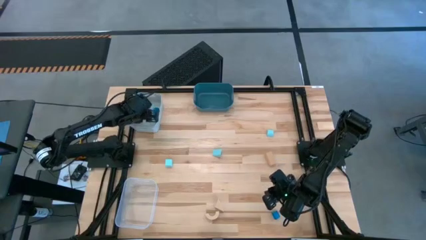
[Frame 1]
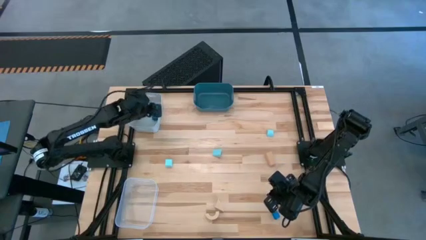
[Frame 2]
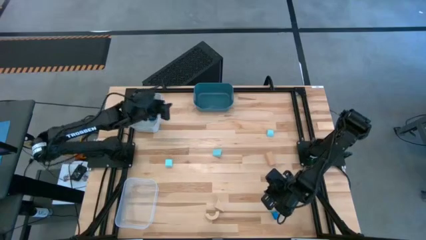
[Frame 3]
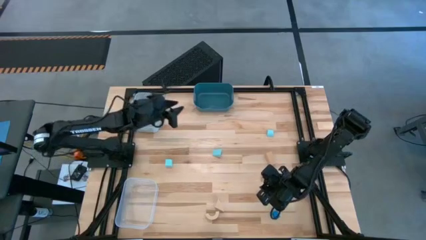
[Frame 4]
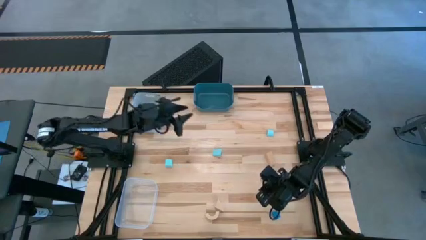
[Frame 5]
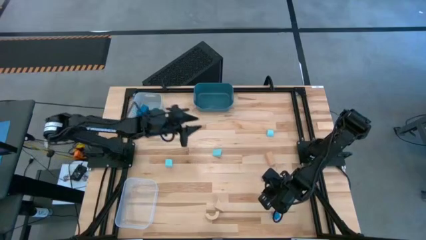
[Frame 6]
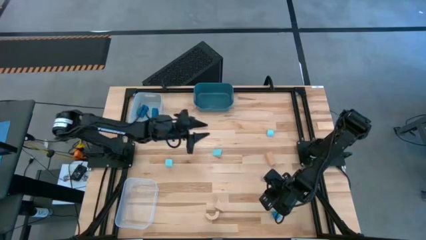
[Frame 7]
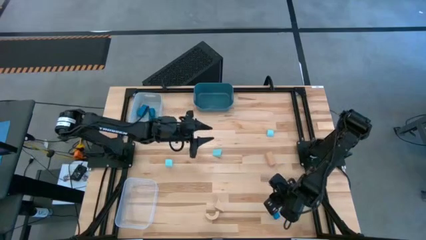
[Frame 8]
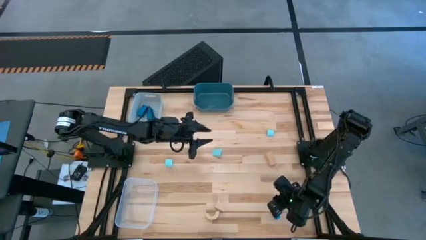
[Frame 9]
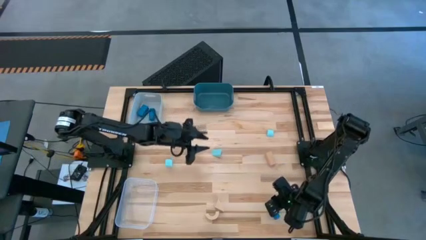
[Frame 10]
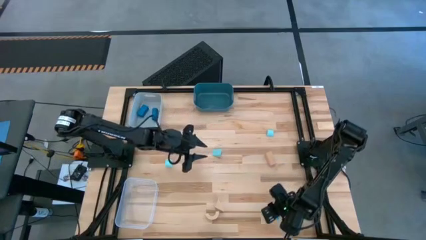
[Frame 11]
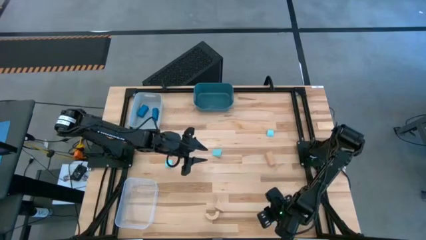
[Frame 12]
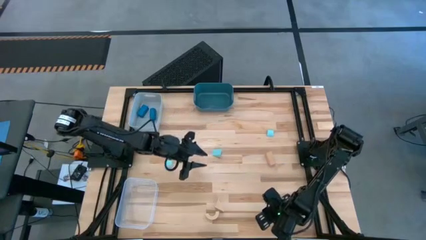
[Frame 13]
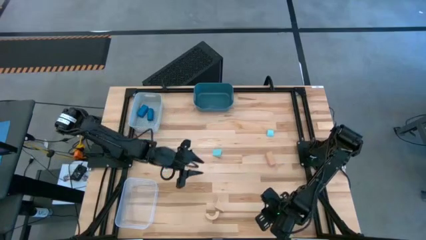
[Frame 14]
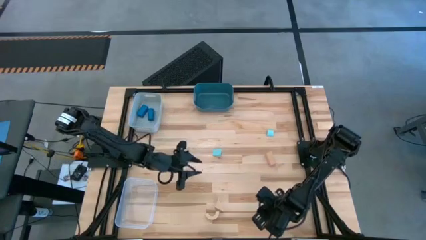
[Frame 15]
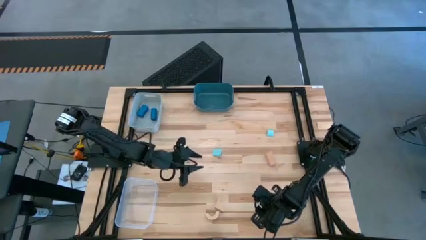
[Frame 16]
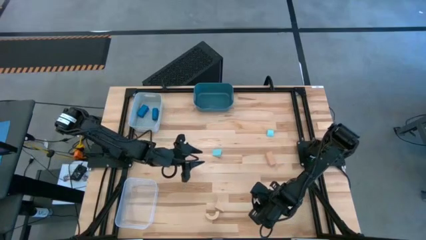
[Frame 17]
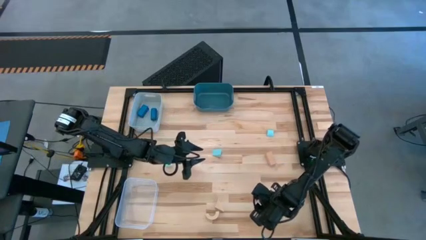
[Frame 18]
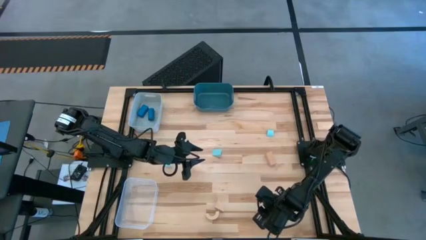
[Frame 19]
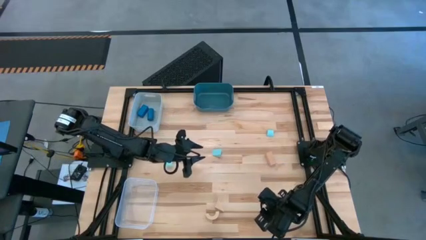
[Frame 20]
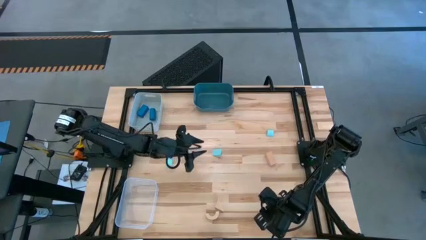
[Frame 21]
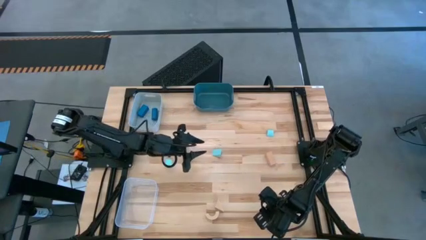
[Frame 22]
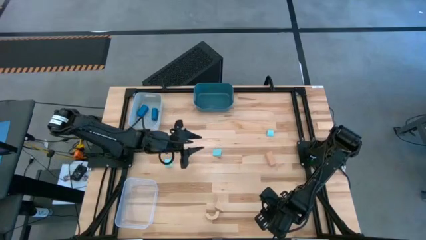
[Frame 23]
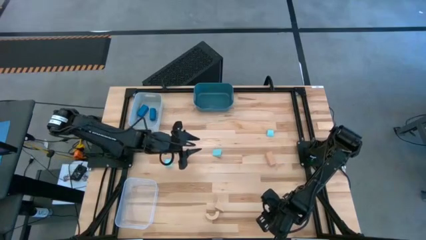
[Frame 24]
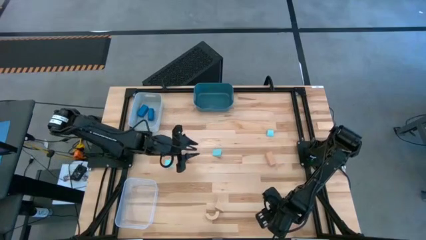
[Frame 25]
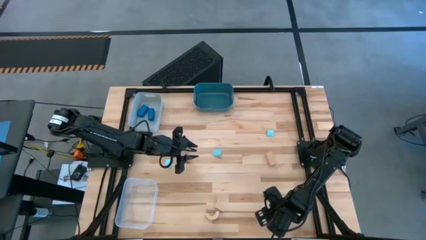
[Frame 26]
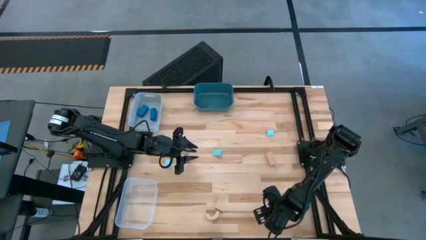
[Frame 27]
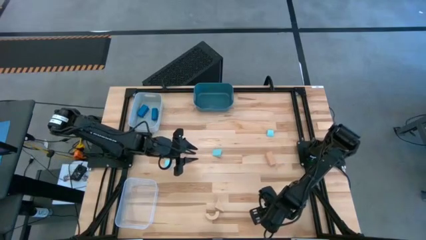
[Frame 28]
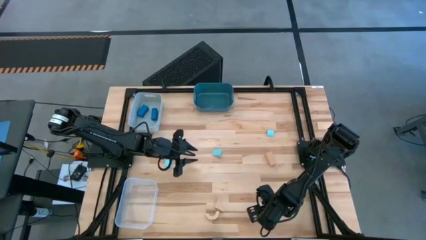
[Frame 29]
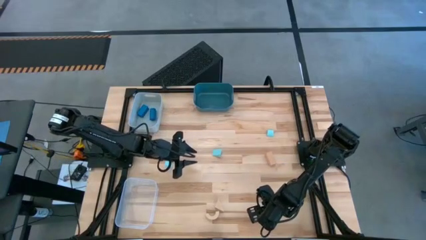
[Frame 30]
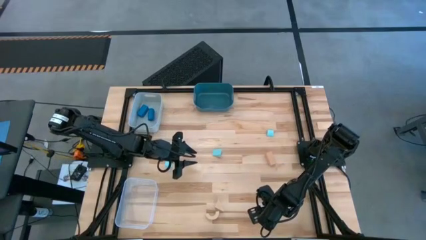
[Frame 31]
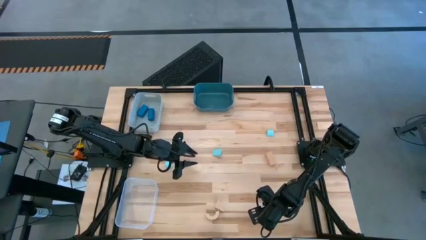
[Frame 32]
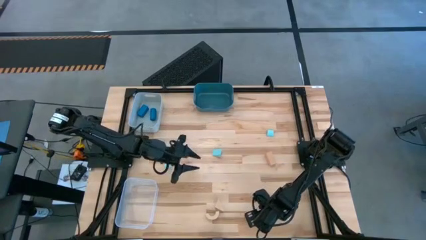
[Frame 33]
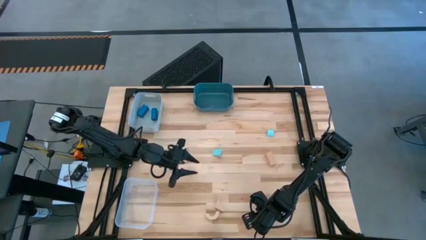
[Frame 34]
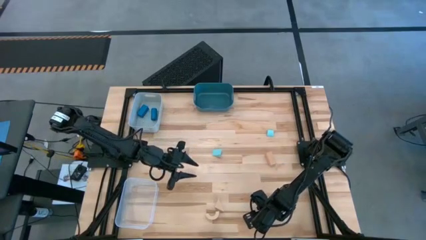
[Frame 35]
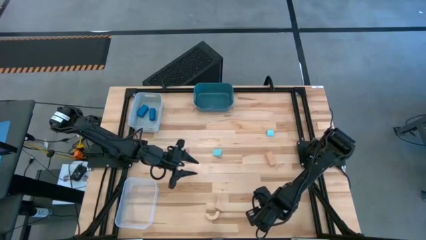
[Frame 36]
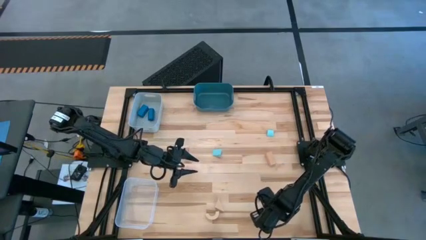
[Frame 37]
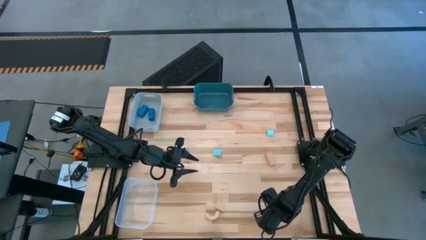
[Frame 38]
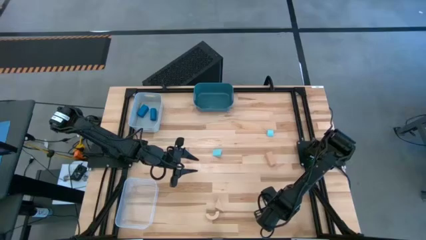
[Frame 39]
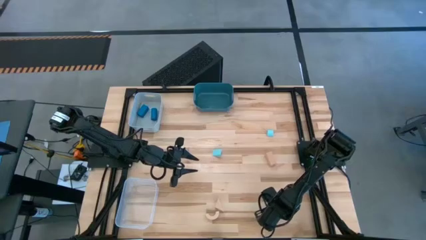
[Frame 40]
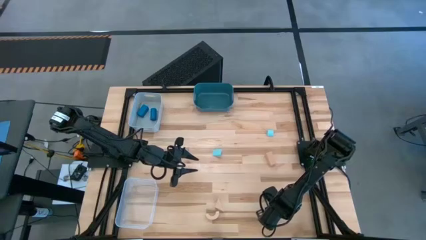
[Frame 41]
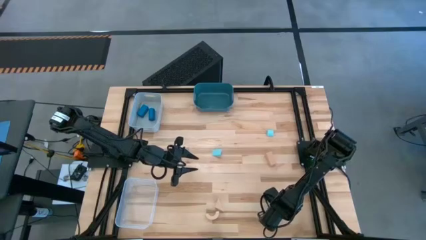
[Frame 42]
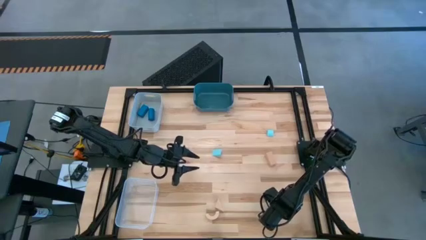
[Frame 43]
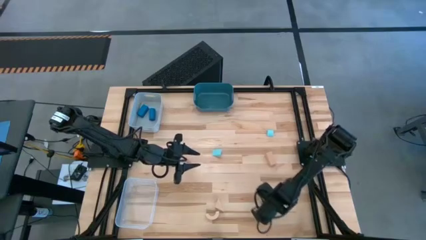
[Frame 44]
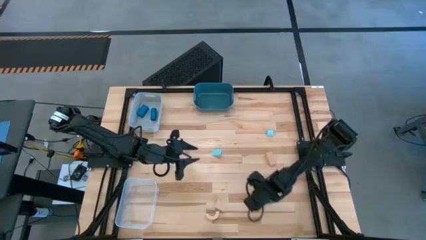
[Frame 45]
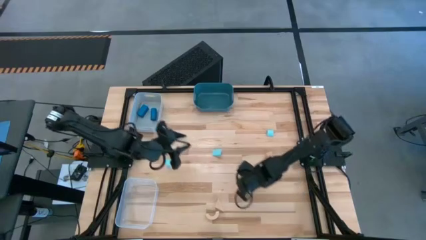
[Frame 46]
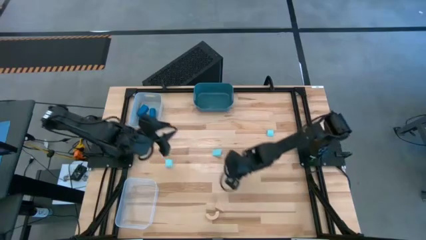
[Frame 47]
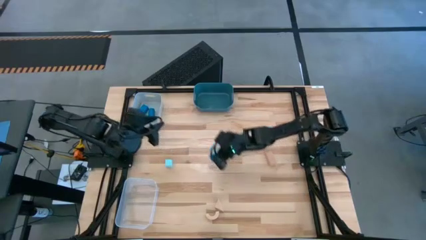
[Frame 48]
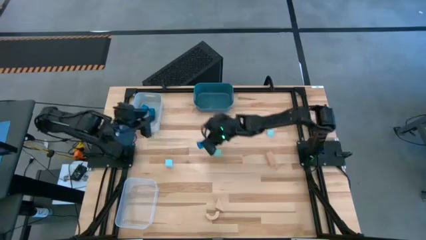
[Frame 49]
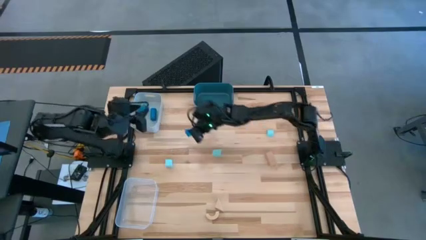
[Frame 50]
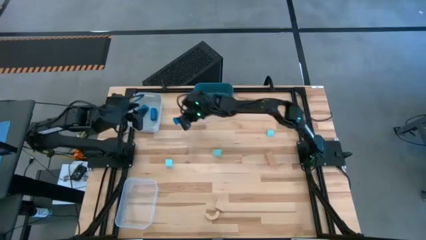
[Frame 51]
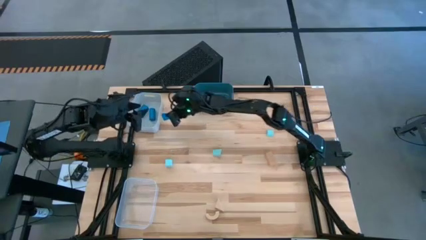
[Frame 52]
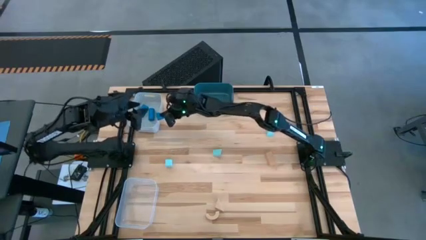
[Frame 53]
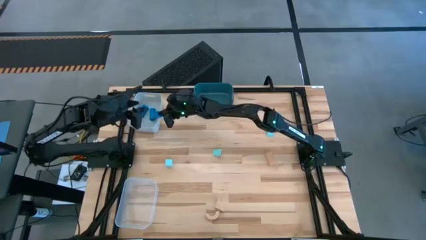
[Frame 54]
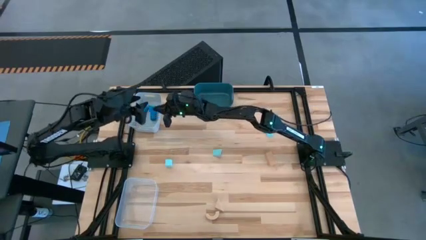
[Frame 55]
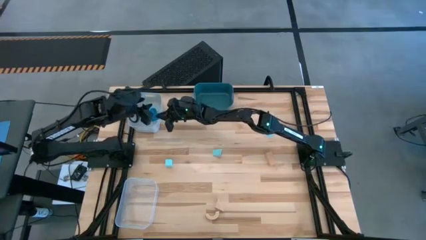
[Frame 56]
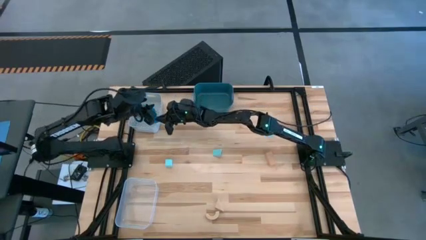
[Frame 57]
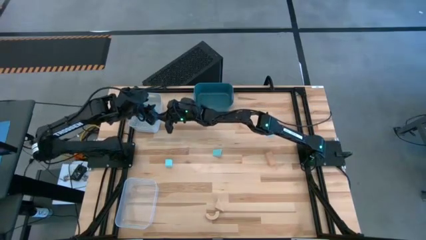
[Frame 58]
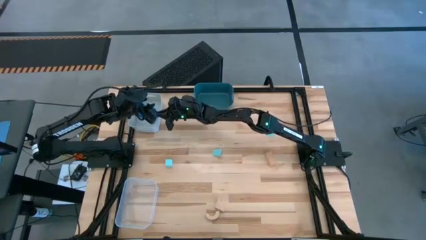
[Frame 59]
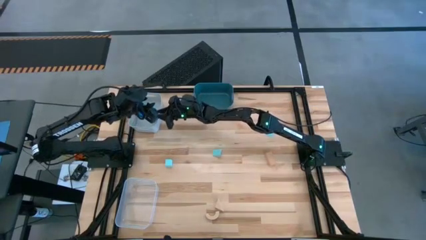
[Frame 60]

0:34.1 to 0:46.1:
Task: Sort & place blocks by color
Put the blue block into the gray bin
